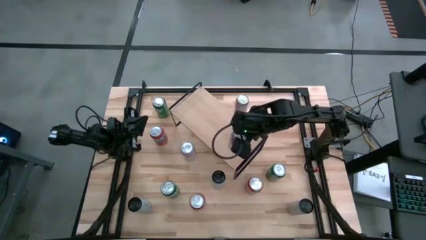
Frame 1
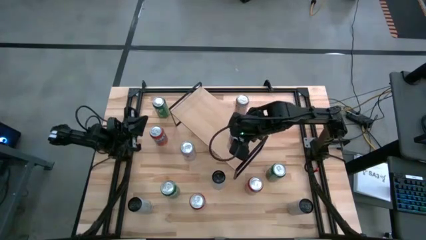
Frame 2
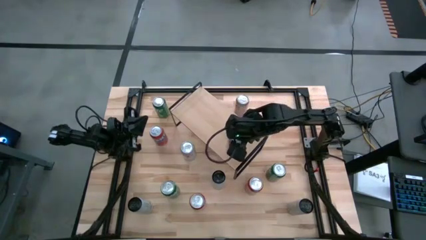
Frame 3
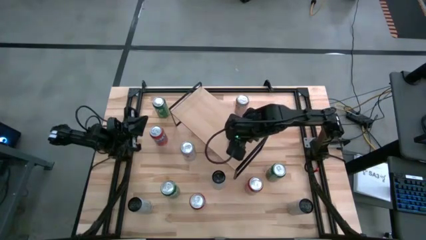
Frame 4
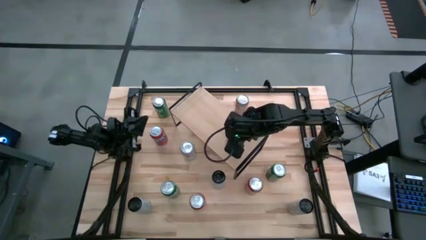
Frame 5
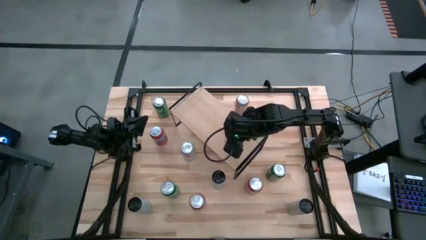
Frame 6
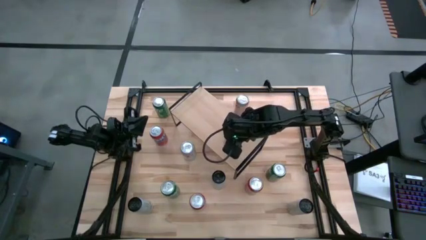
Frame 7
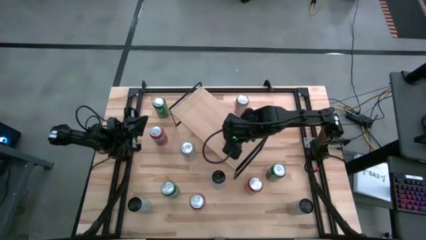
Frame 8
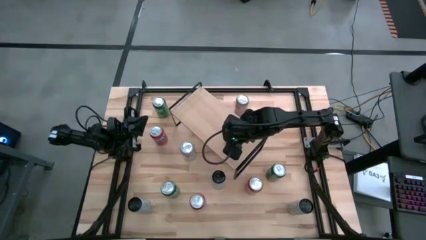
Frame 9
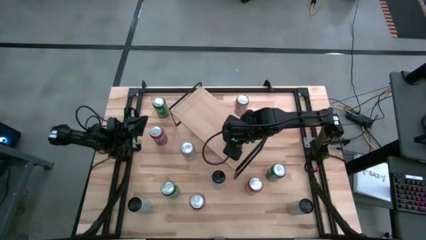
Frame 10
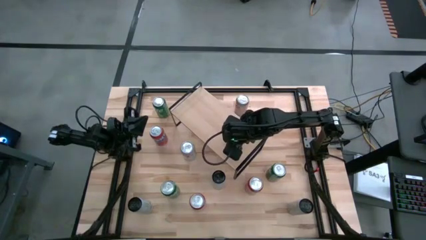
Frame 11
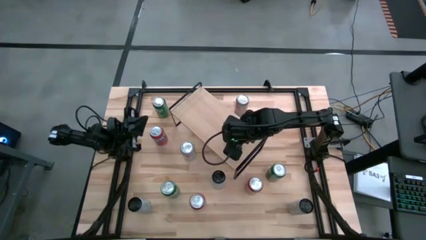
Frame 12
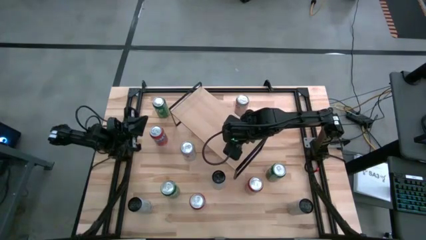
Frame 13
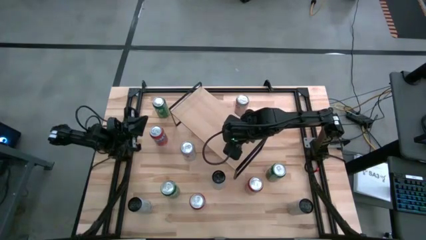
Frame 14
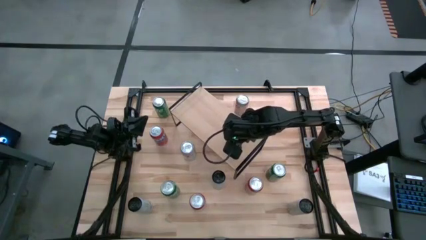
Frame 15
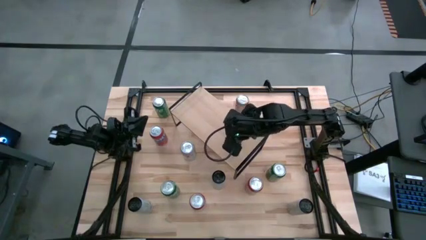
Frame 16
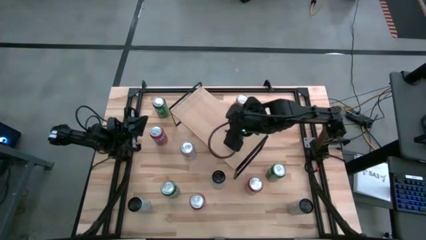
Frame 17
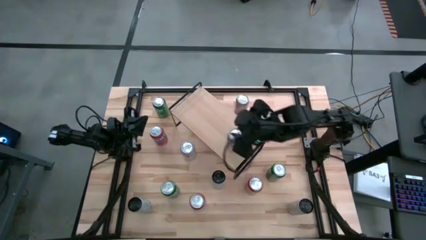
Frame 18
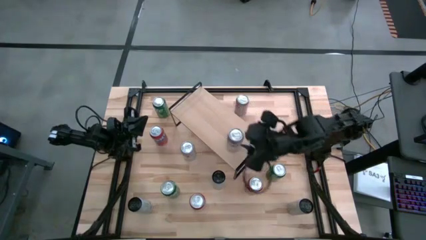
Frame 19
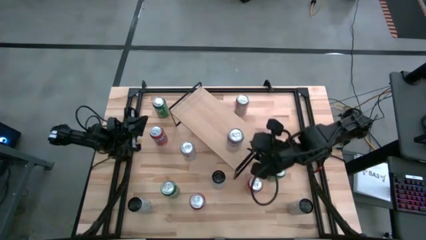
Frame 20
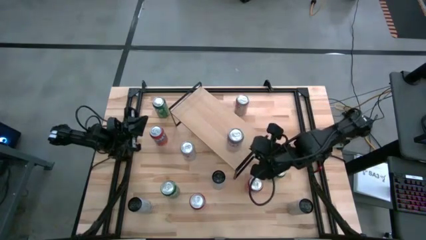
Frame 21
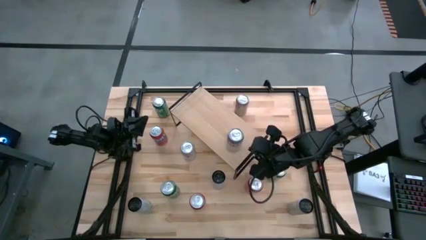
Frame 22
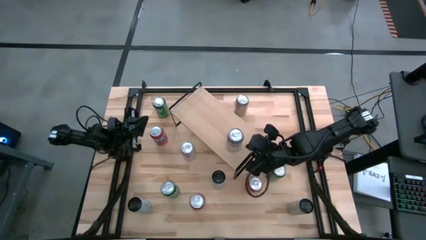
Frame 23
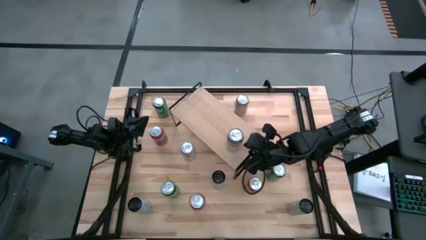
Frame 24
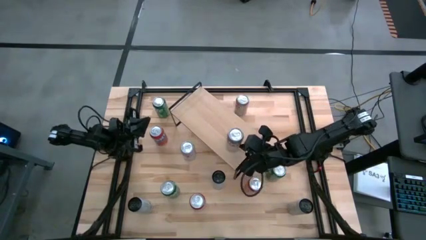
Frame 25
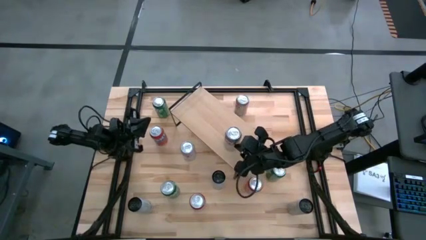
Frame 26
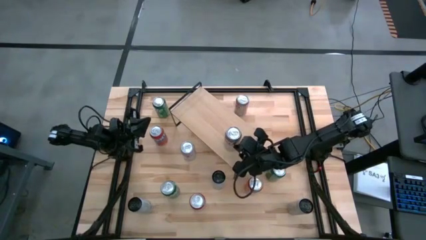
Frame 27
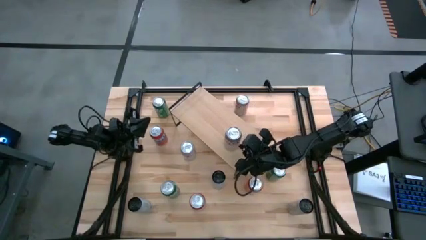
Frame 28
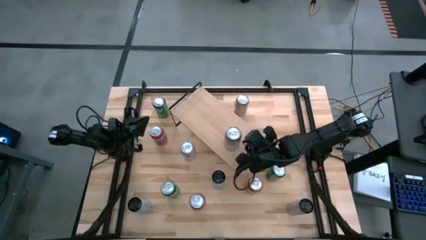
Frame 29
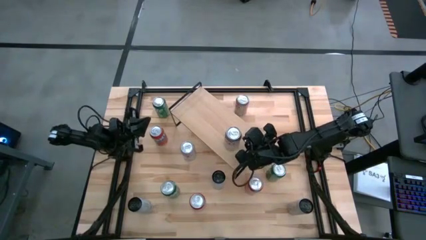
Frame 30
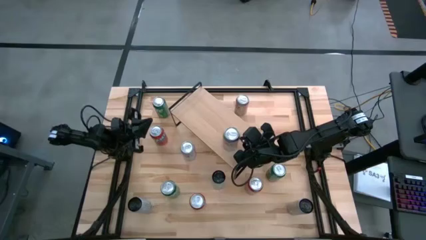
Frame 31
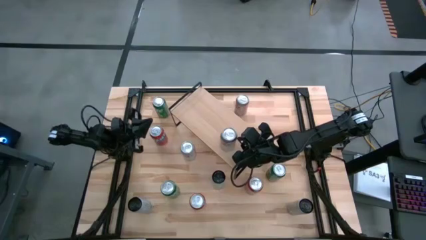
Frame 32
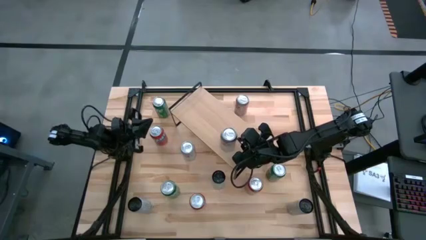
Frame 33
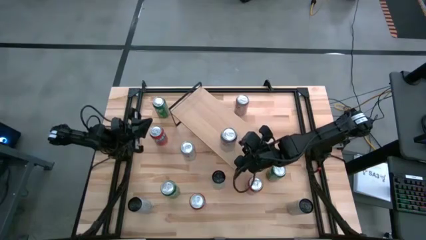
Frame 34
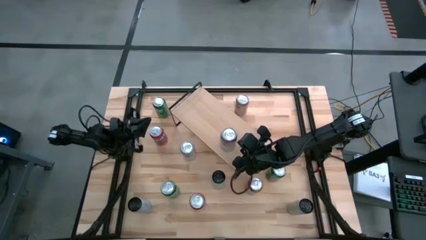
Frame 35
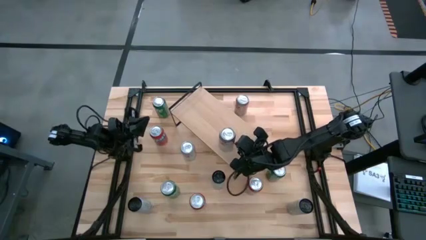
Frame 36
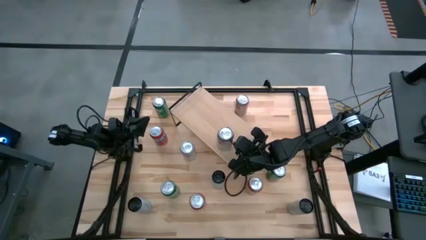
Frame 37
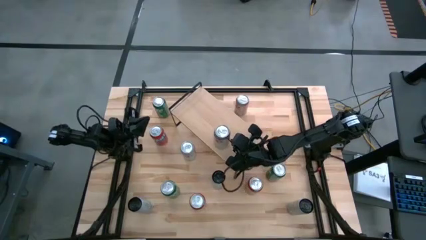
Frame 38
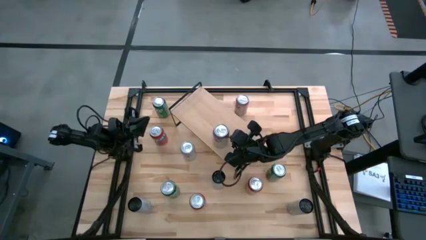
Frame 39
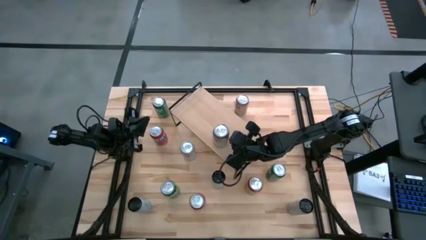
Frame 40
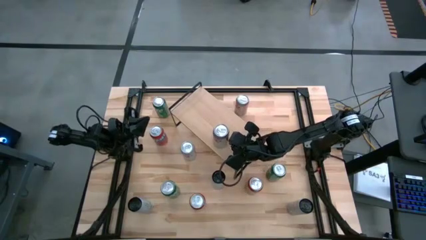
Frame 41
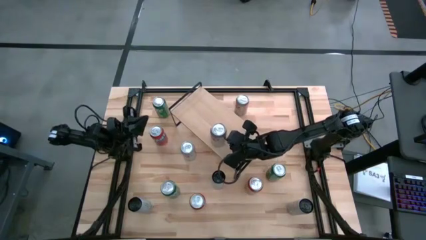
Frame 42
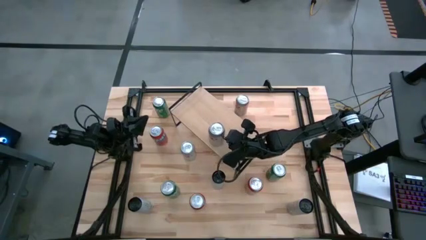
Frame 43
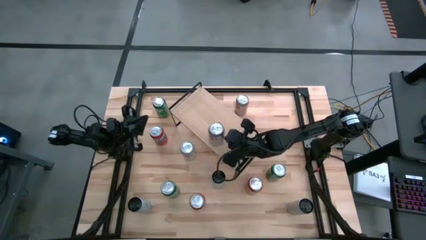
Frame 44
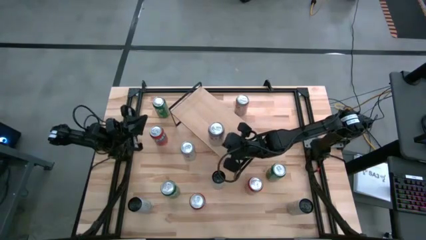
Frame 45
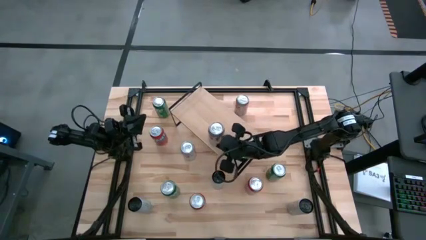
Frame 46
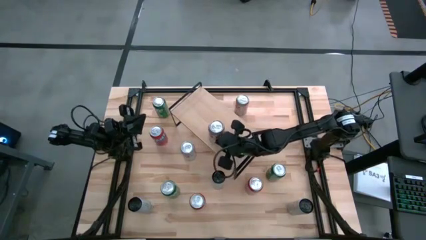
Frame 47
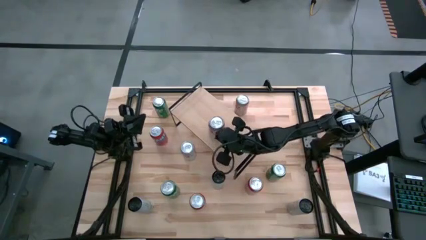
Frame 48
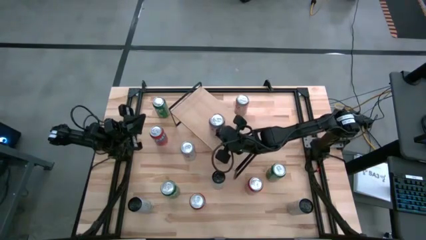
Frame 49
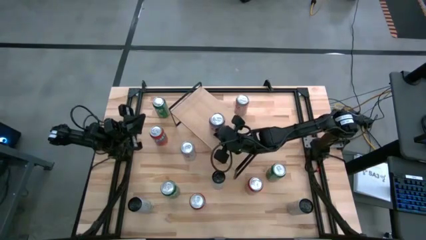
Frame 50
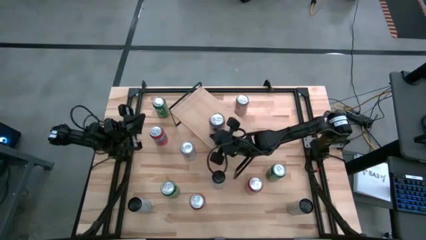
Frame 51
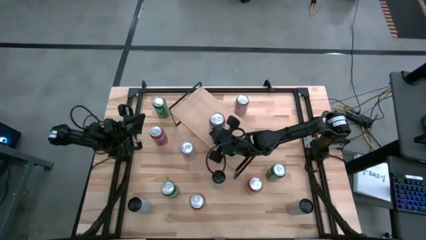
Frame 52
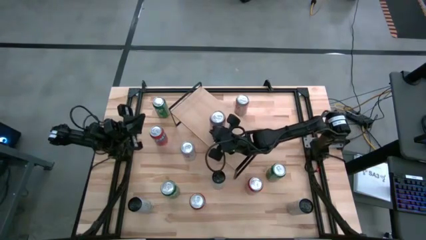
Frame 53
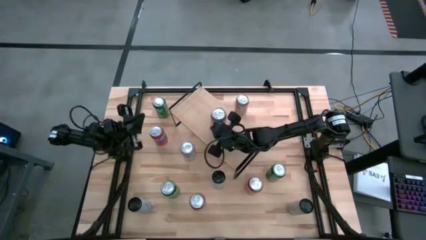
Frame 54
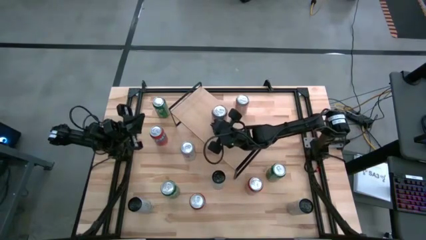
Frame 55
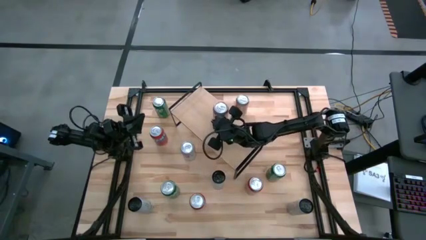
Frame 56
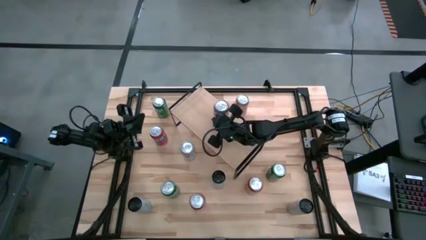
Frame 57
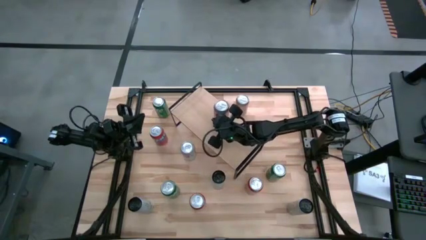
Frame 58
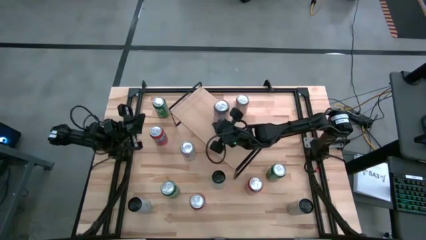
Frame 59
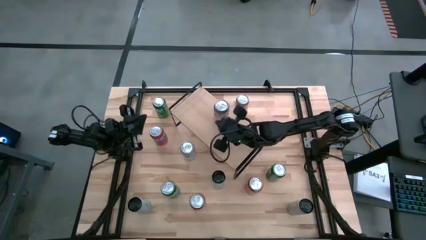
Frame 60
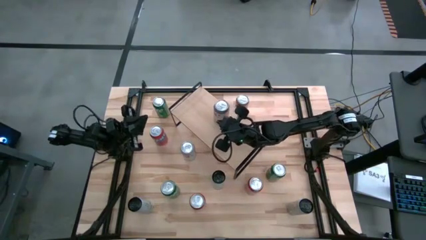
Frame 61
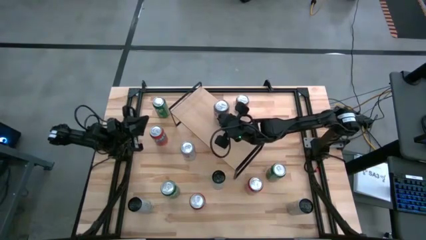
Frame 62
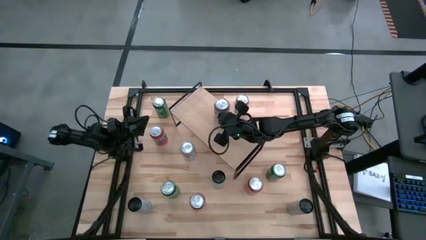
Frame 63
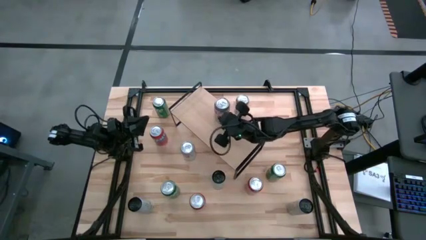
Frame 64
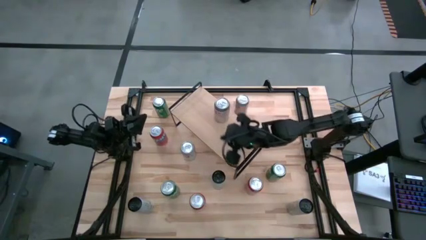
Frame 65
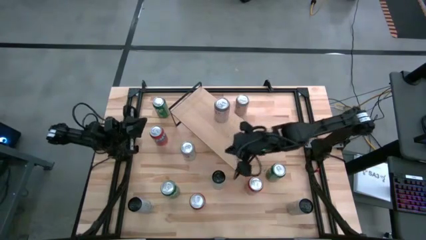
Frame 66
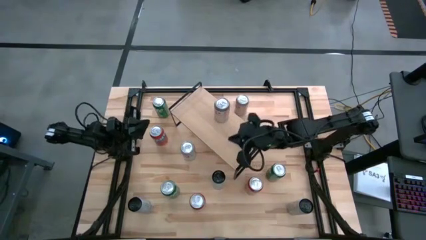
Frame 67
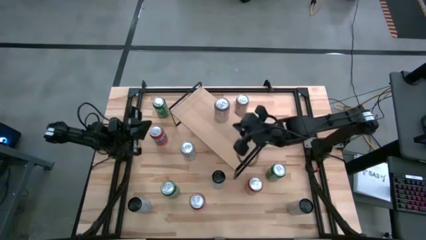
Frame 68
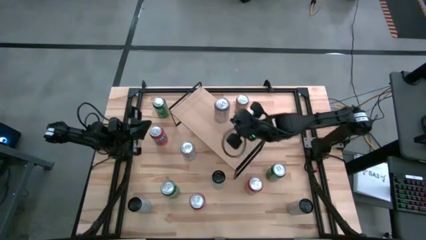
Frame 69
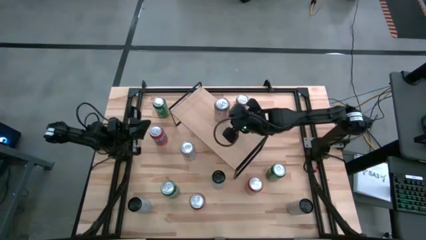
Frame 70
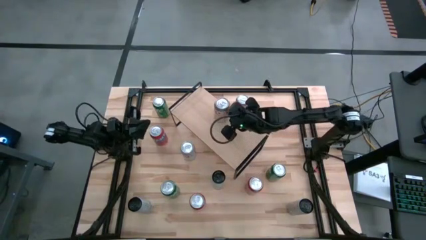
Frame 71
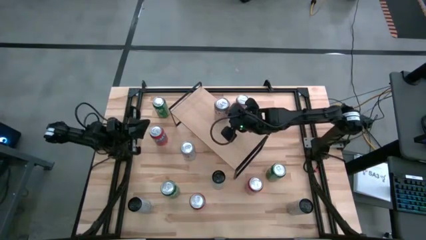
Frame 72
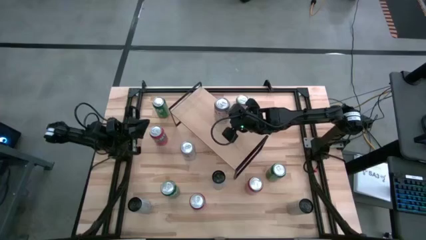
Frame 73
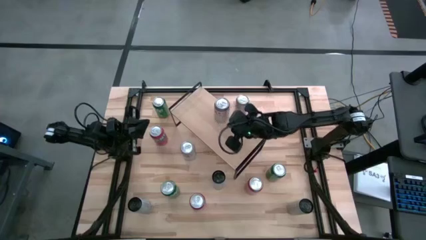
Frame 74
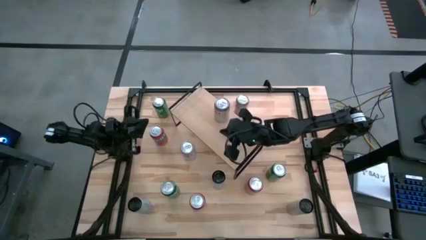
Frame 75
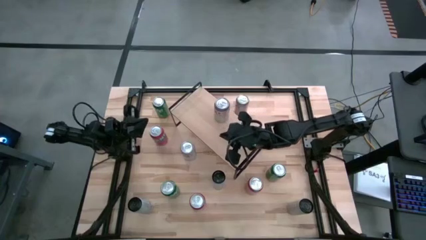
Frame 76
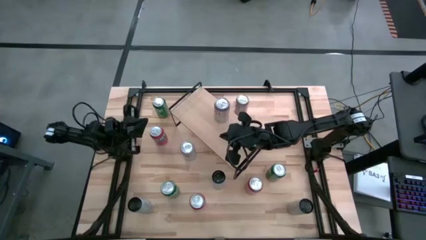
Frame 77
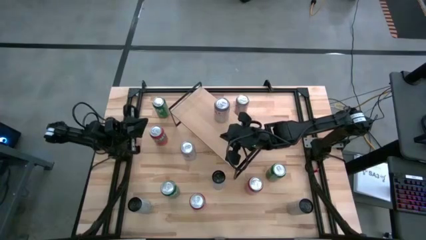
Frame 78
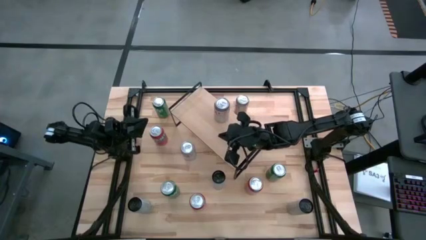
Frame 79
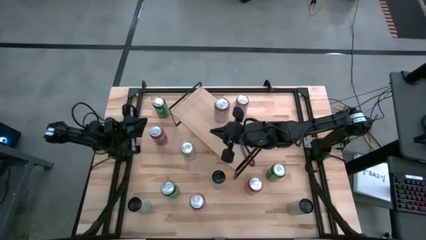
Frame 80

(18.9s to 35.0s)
Task: Place canned beverage on shelf
Put the middle right silver soda can on the shelf
